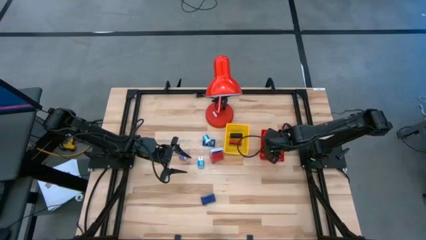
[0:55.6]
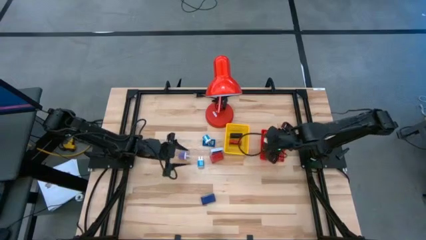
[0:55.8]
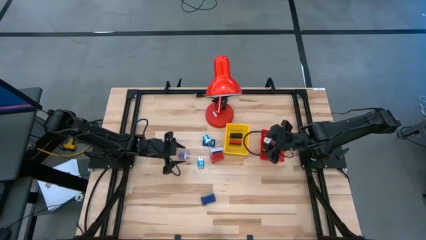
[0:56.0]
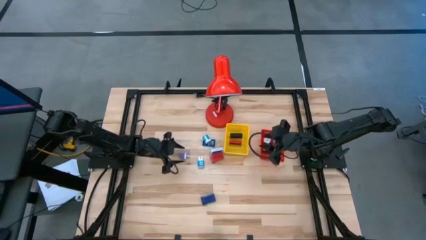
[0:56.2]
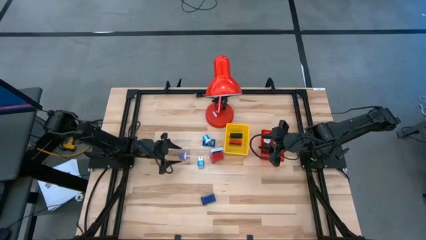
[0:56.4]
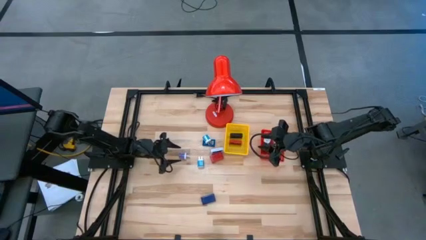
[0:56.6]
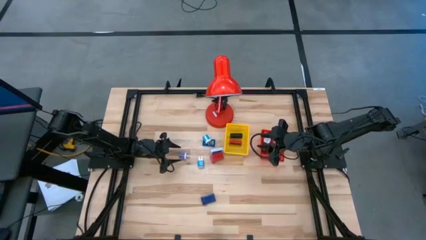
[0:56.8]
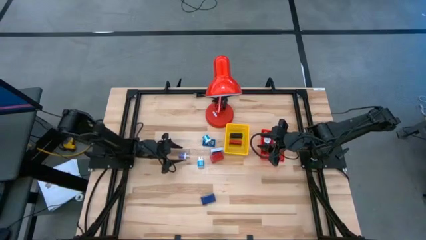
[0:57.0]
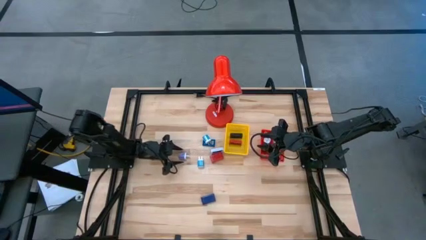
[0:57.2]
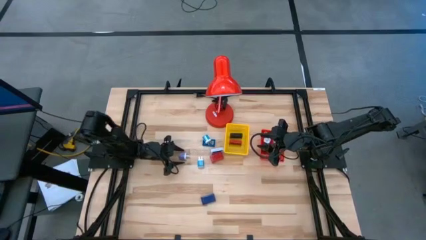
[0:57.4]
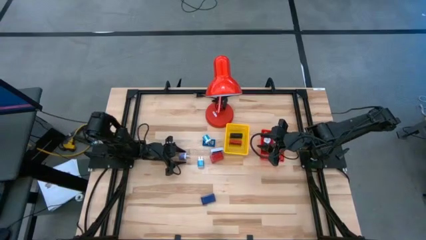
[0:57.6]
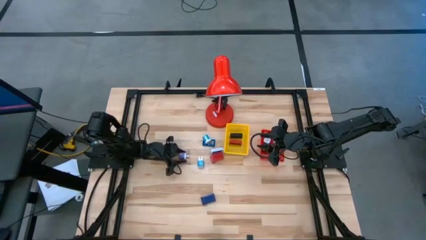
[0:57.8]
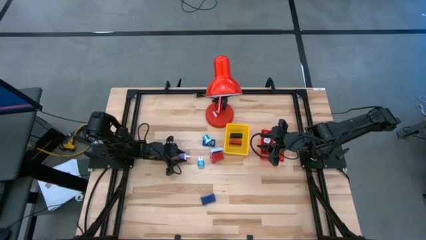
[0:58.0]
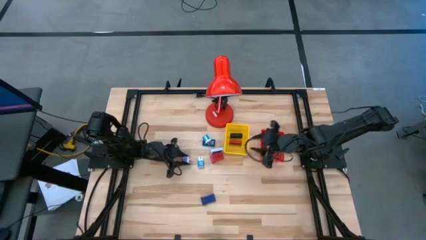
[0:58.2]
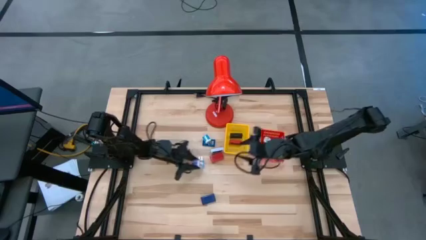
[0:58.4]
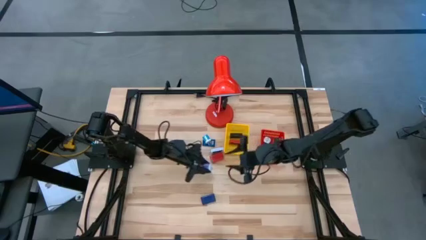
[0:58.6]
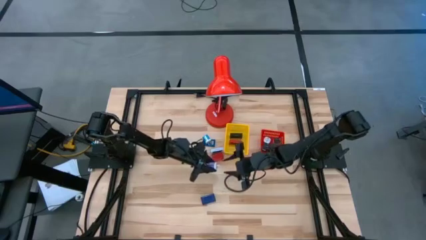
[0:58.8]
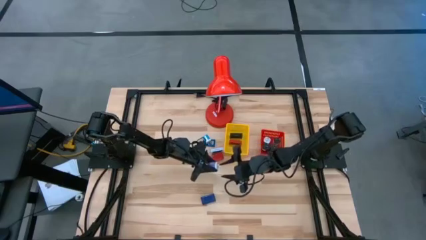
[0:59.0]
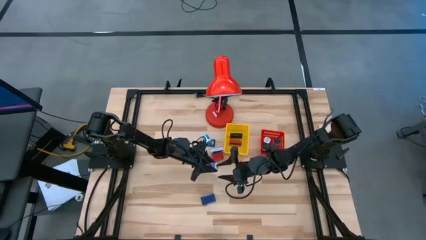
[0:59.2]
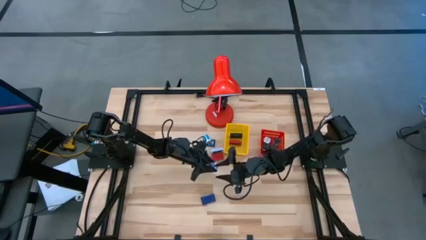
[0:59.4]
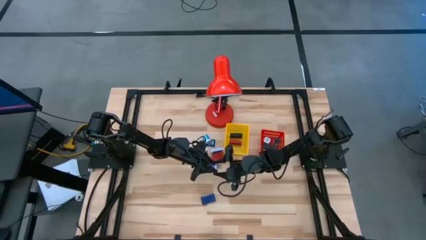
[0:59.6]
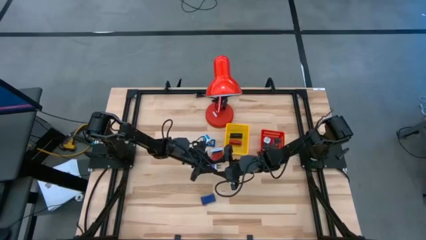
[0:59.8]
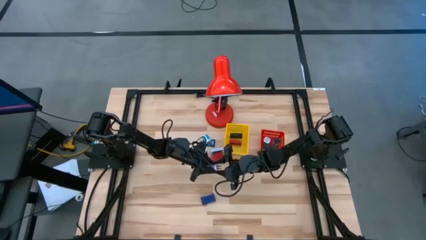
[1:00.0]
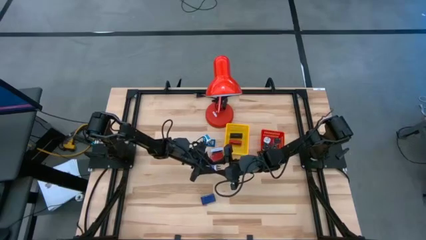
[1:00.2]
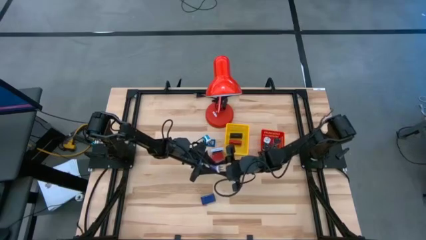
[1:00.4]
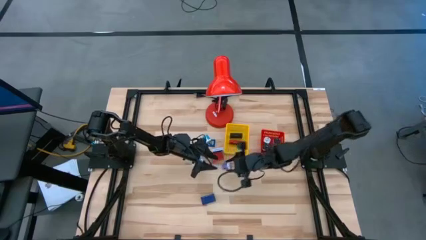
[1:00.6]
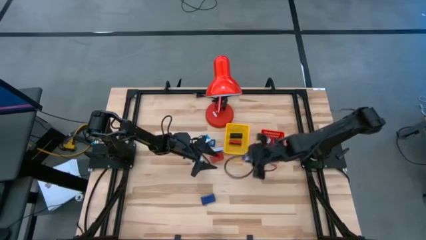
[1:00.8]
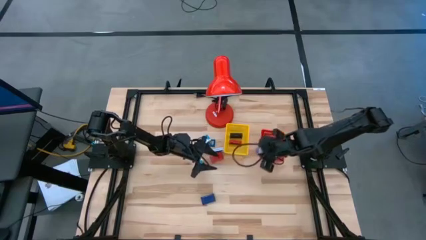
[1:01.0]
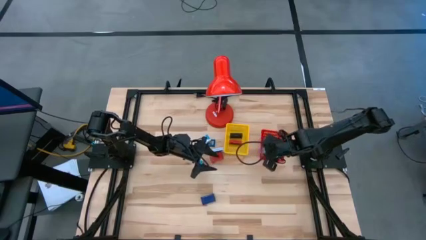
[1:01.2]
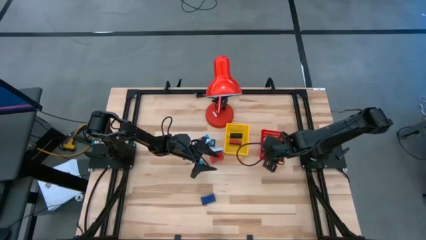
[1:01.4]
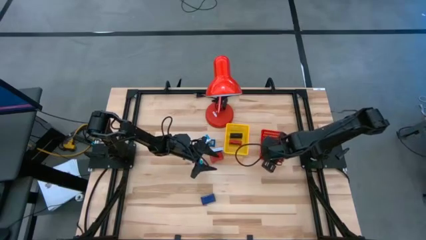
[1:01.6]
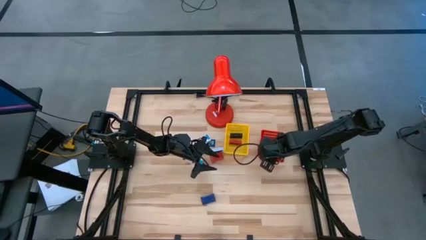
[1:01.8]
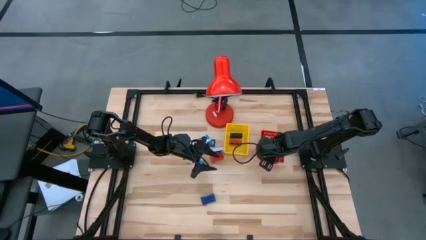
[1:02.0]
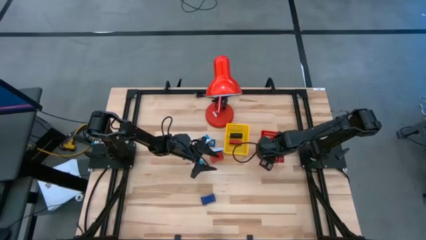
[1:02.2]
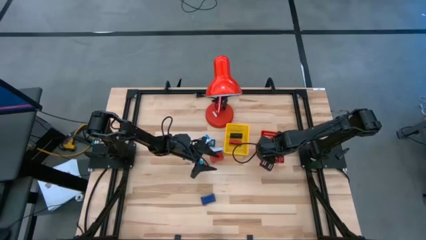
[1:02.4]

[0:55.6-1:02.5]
Task: Pick & Place Office items
Put the purple charger adapter into the red bin

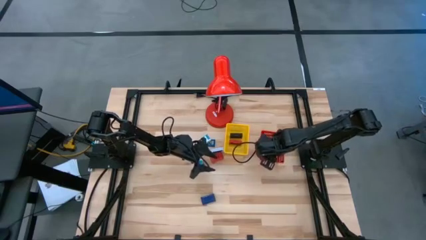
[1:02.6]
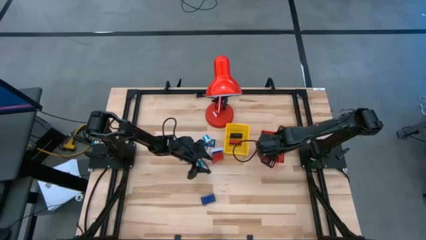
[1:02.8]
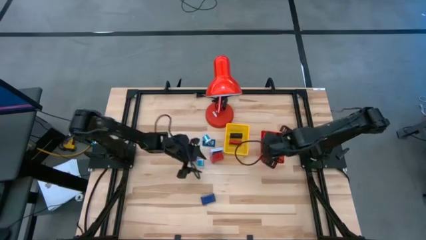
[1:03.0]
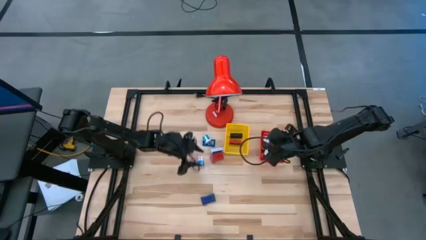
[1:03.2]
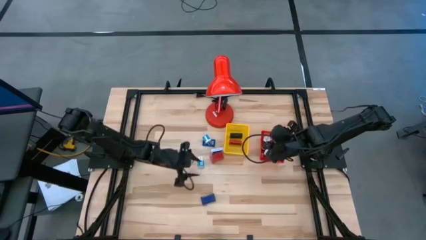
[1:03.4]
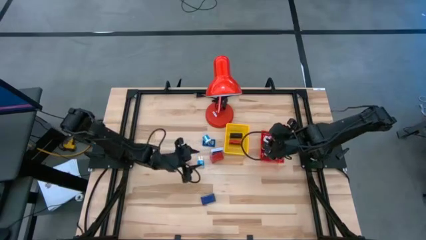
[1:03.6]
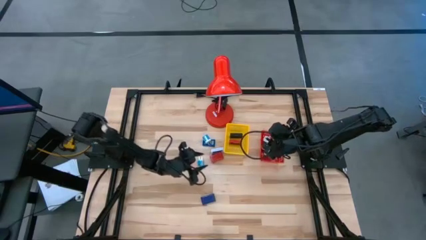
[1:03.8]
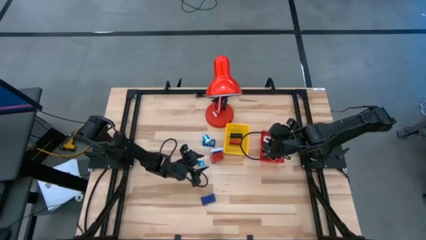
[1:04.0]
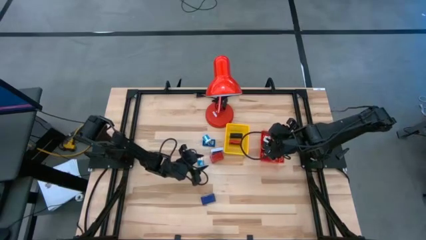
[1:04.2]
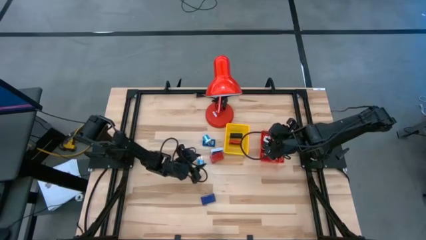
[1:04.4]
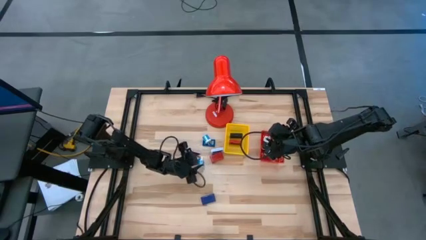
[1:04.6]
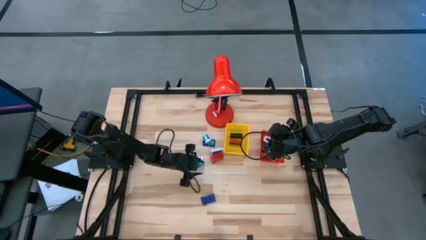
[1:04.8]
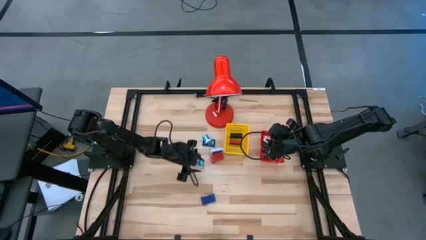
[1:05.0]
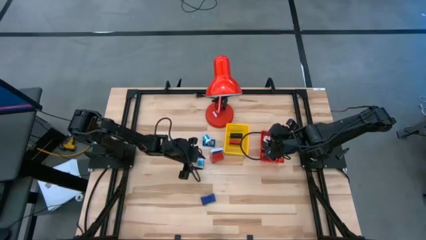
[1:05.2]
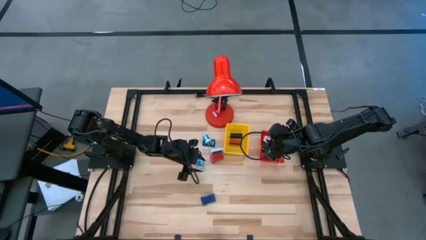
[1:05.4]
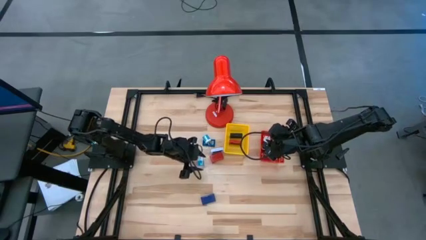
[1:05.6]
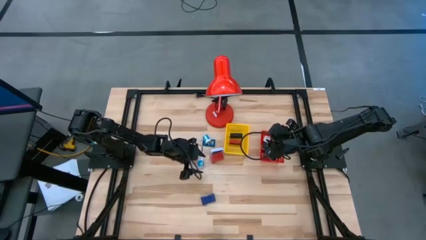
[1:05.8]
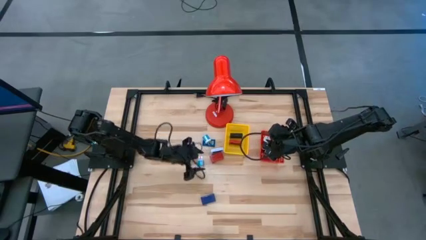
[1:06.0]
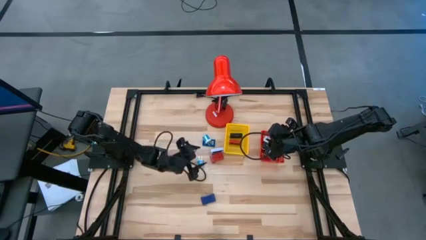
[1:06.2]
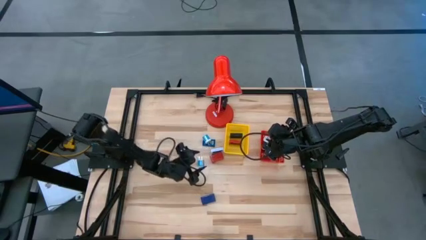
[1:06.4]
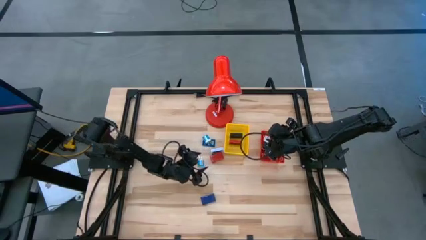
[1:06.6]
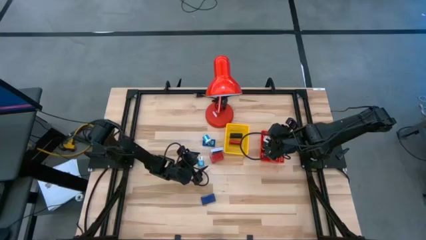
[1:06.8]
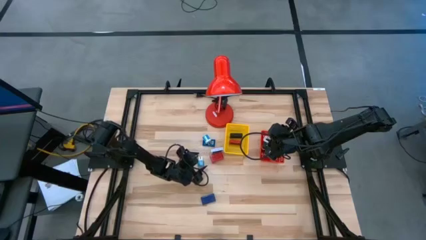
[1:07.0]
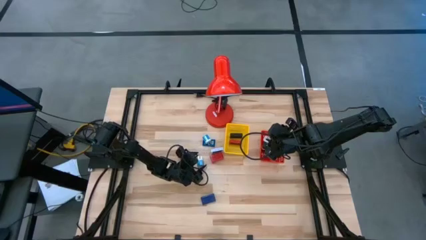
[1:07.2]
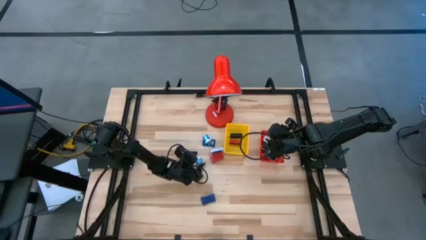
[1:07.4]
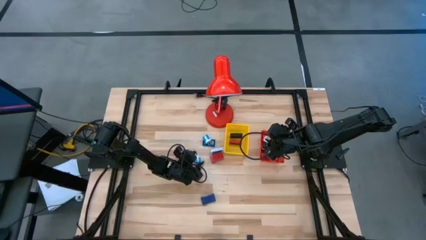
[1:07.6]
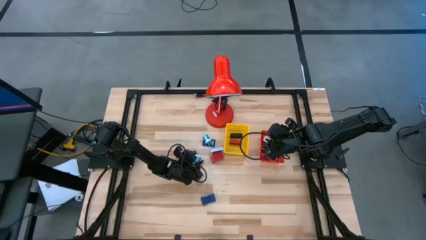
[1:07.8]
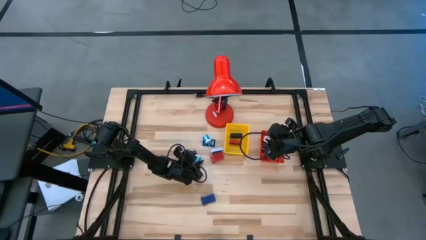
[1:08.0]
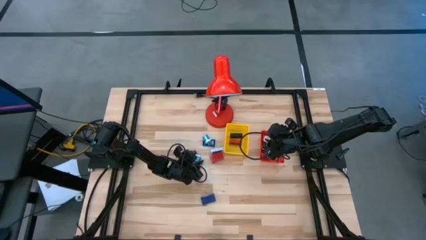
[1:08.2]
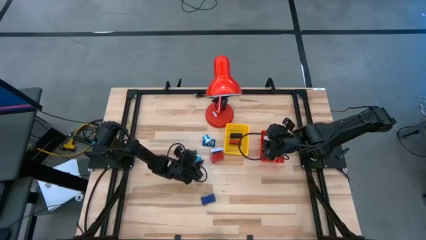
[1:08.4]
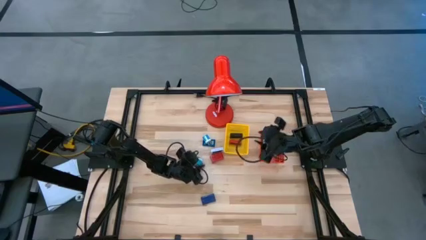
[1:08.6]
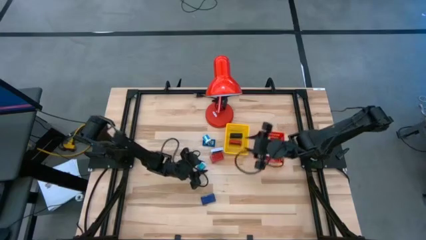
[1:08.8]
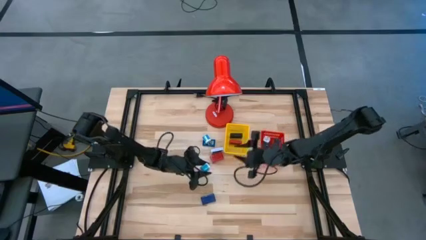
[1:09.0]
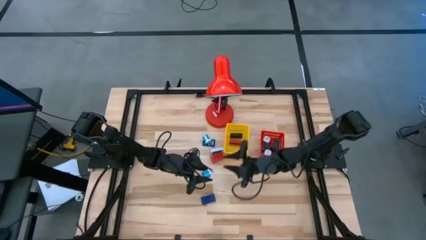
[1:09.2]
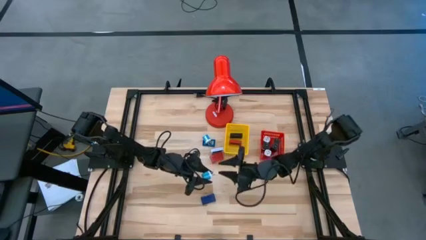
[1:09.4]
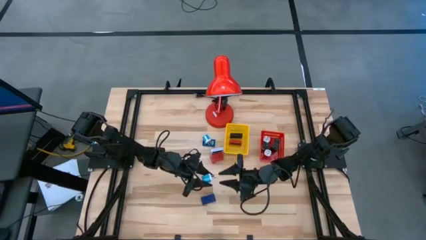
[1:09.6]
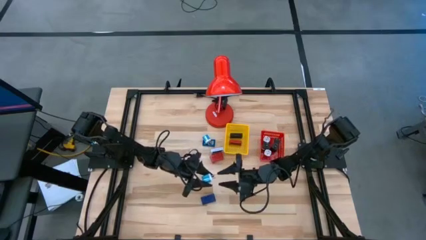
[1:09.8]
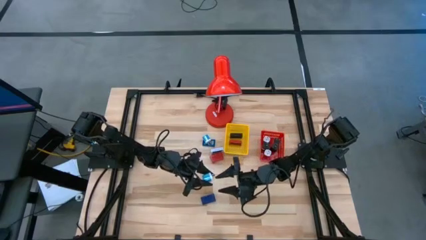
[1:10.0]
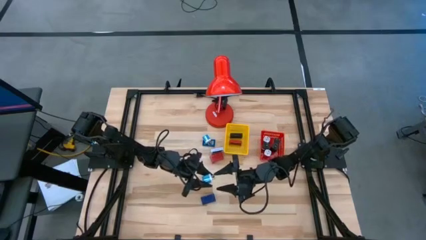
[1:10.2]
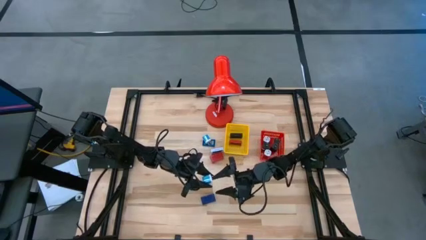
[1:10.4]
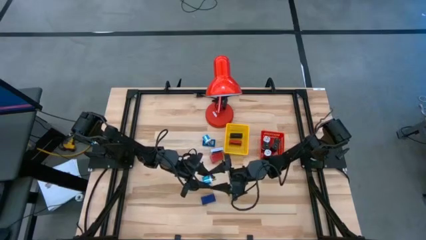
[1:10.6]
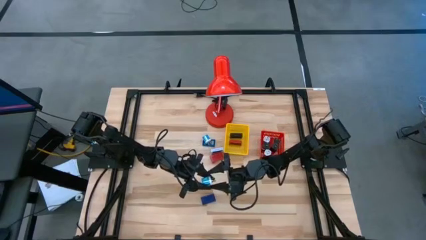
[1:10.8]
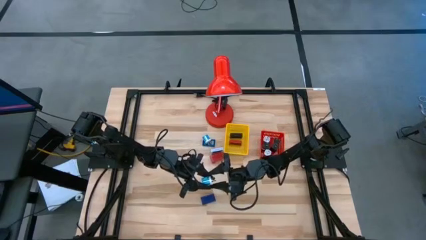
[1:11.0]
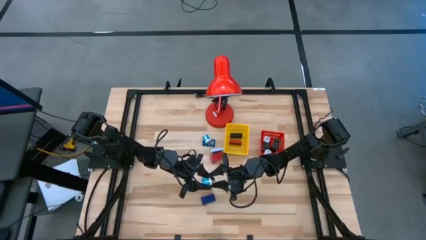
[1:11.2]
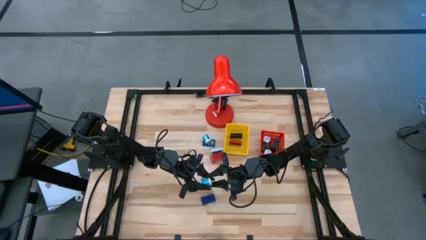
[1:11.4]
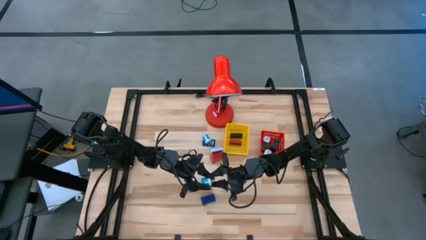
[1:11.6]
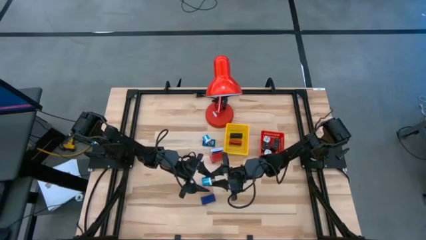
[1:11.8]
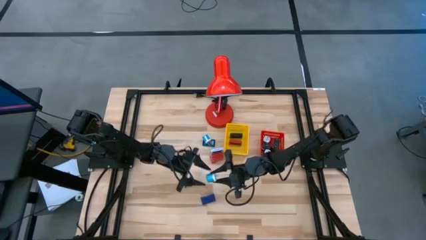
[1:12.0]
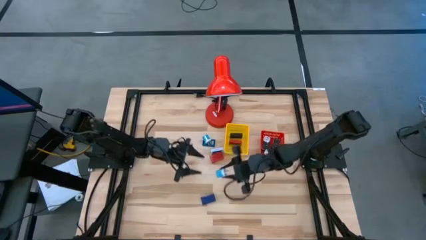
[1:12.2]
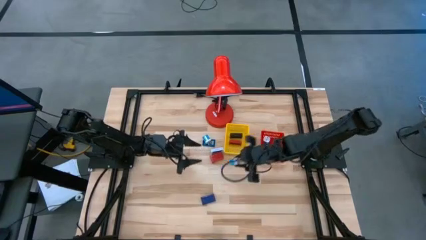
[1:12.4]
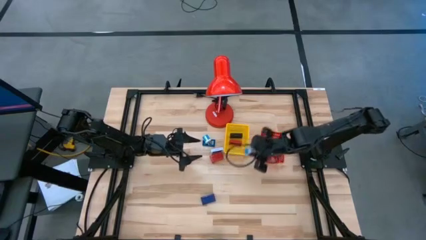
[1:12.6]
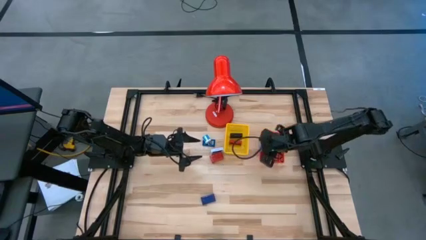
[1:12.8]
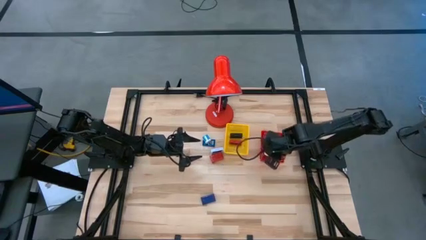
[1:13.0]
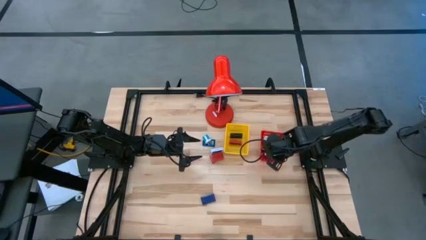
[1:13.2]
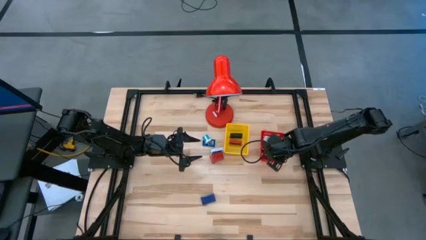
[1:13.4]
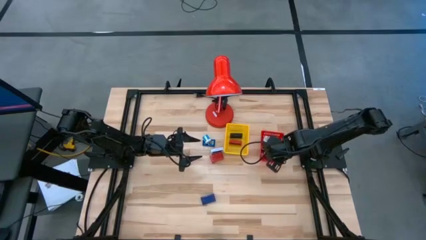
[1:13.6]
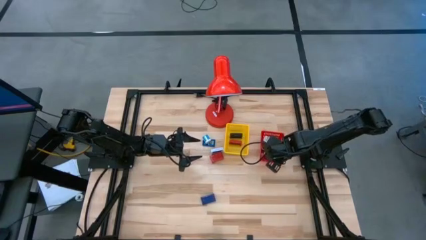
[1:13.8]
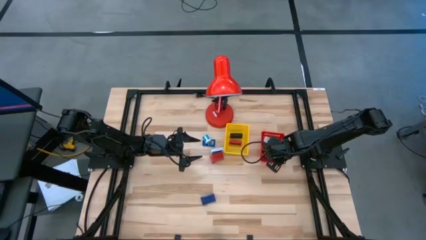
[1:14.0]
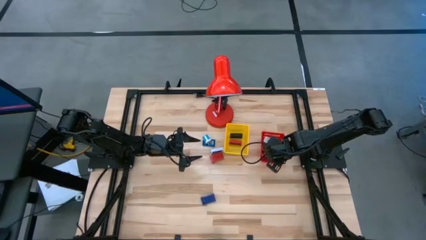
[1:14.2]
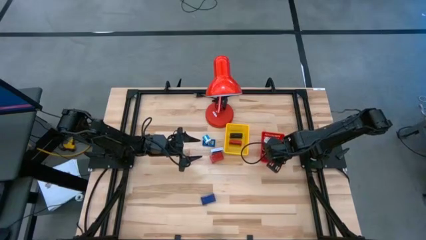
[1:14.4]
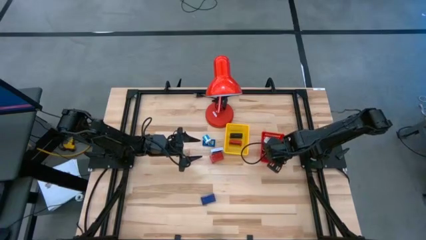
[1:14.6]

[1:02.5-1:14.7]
Put the bottom blue charger adapter into the red bin
